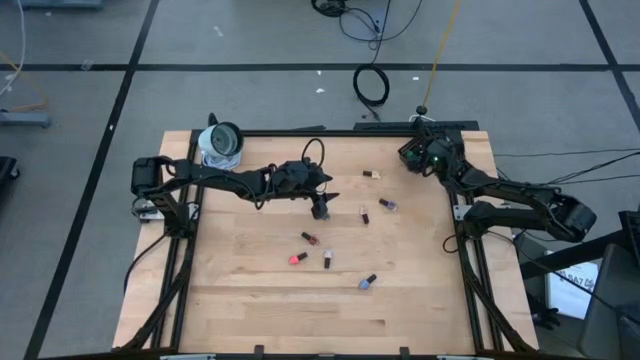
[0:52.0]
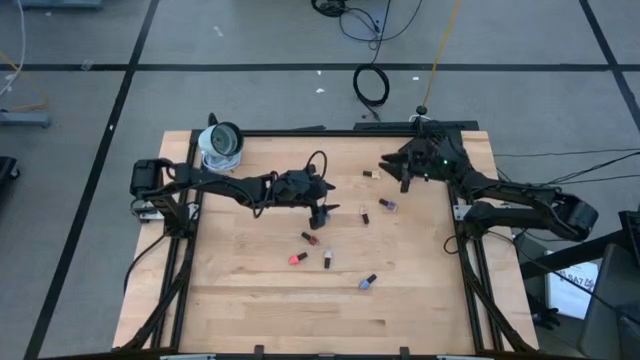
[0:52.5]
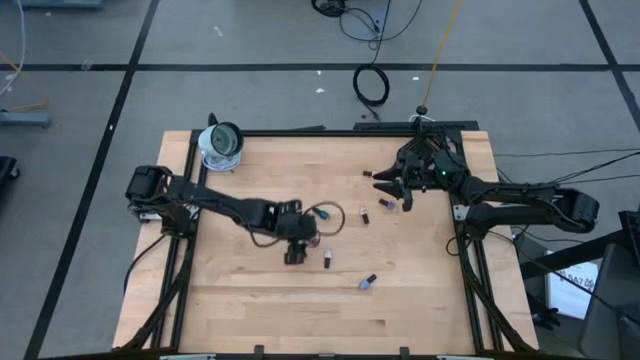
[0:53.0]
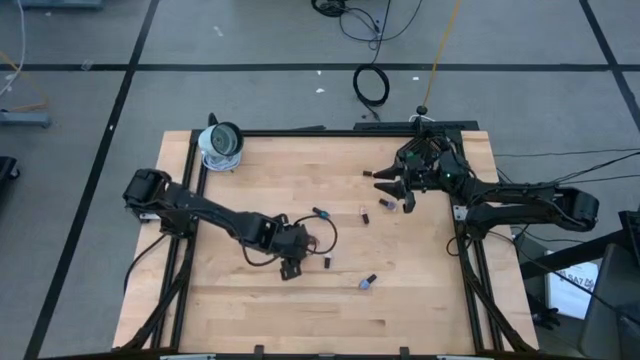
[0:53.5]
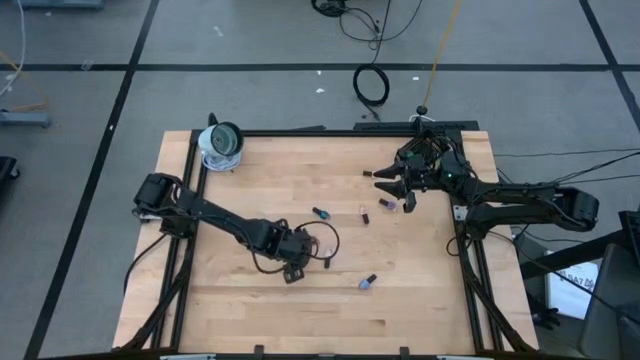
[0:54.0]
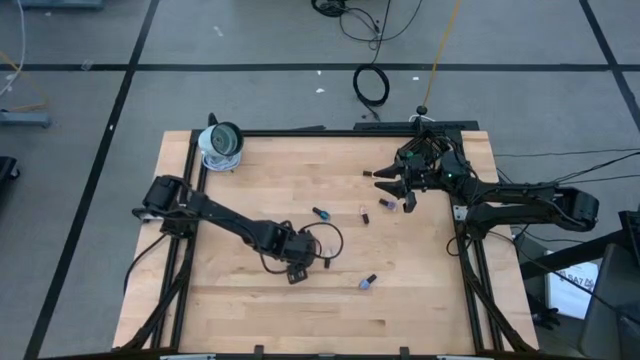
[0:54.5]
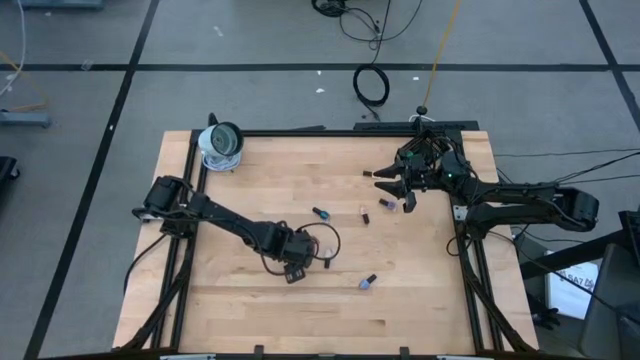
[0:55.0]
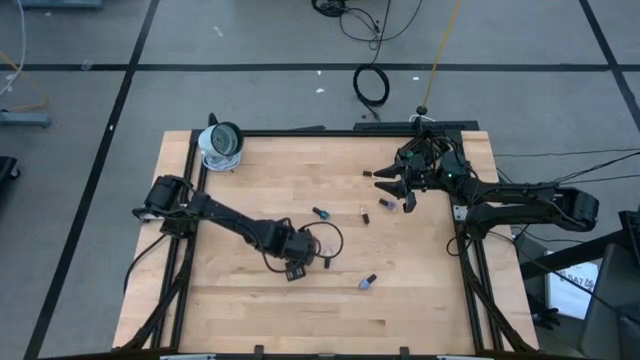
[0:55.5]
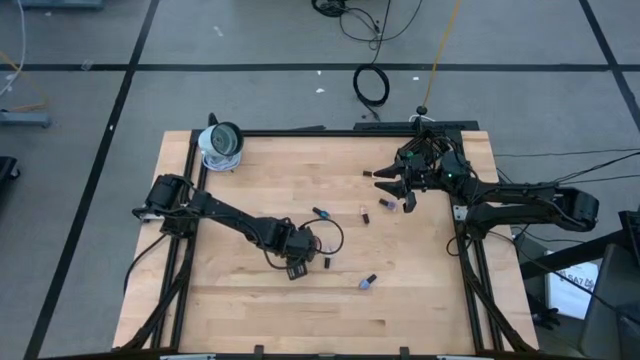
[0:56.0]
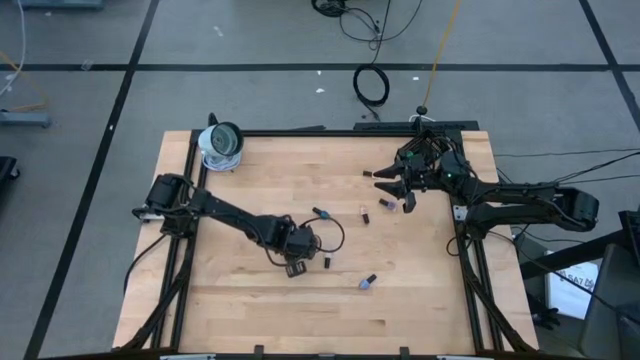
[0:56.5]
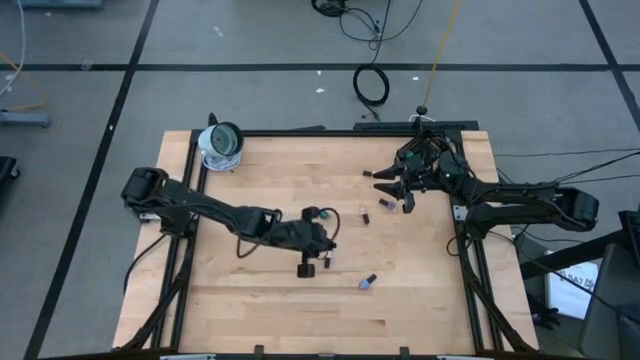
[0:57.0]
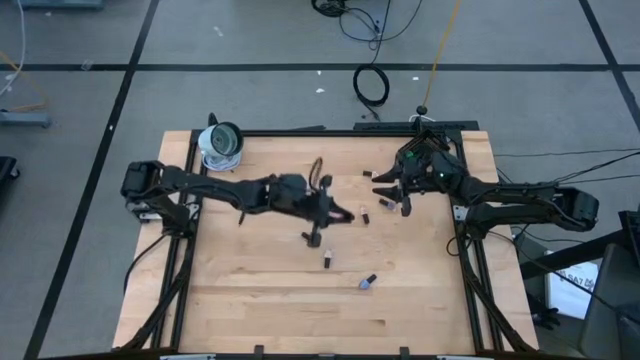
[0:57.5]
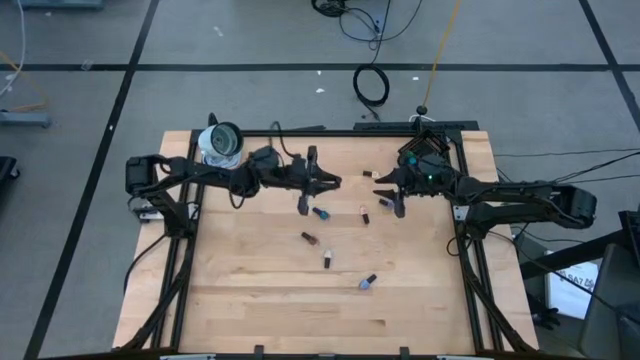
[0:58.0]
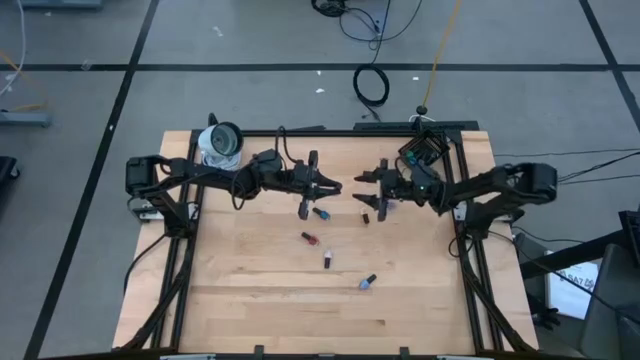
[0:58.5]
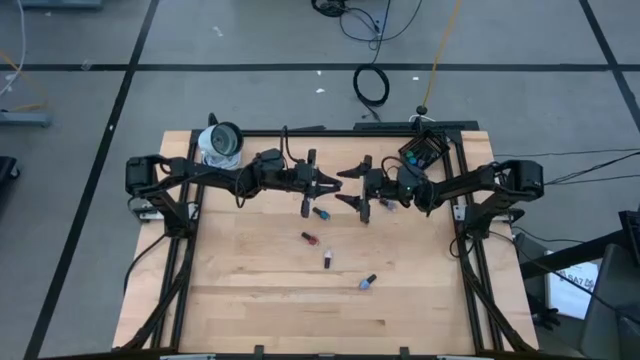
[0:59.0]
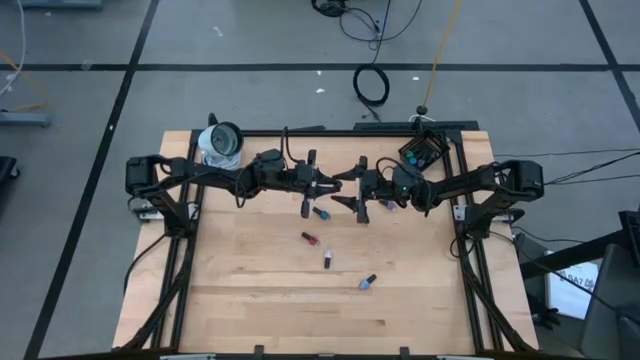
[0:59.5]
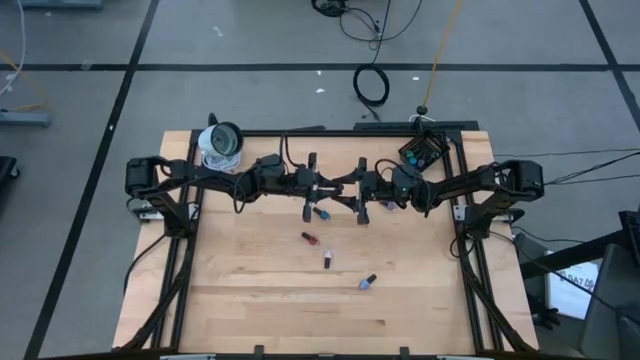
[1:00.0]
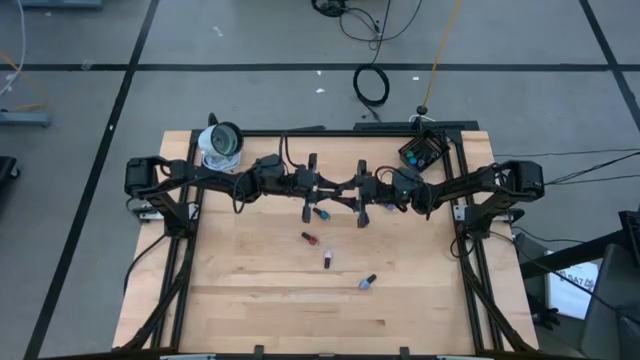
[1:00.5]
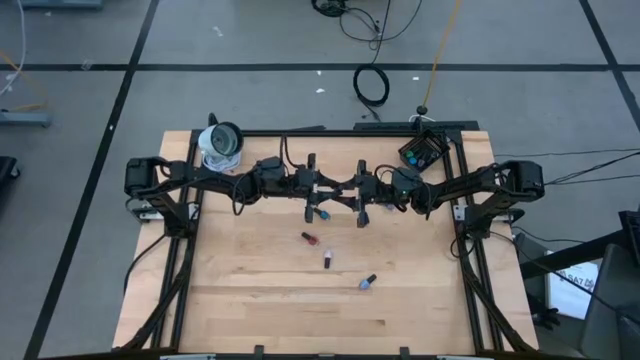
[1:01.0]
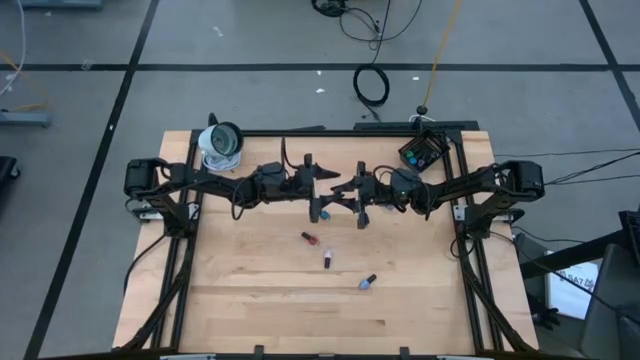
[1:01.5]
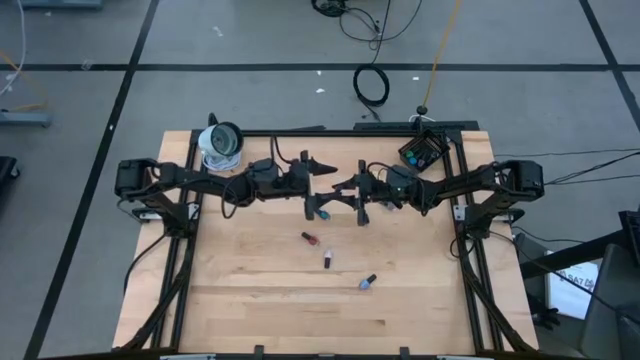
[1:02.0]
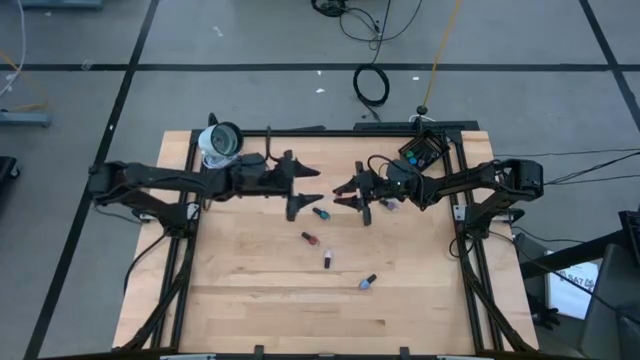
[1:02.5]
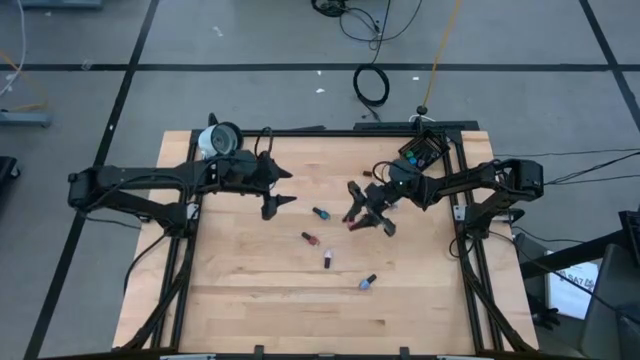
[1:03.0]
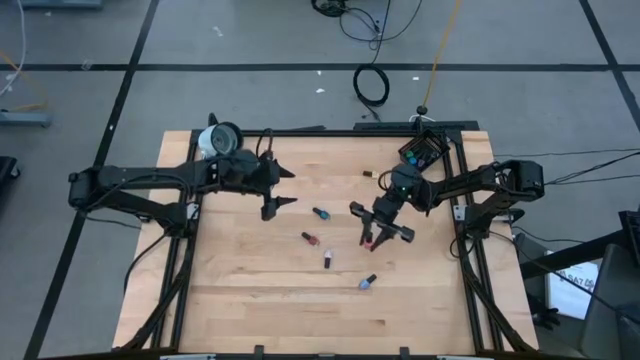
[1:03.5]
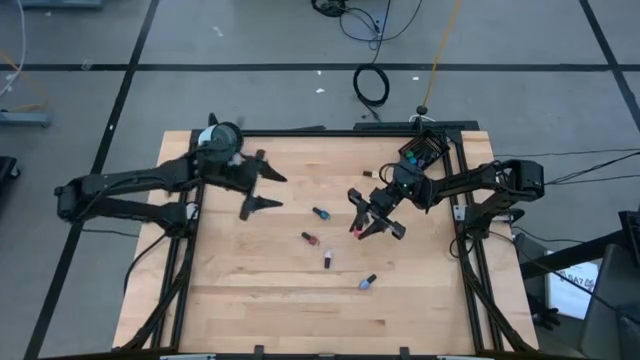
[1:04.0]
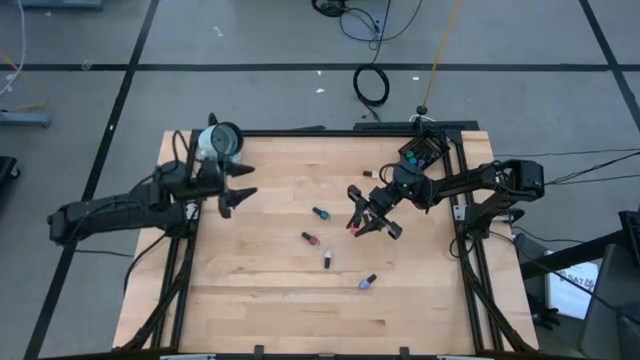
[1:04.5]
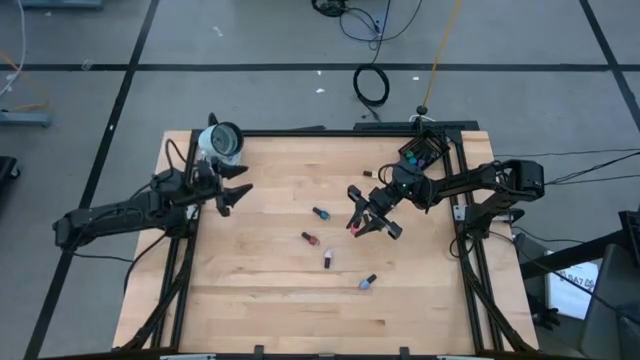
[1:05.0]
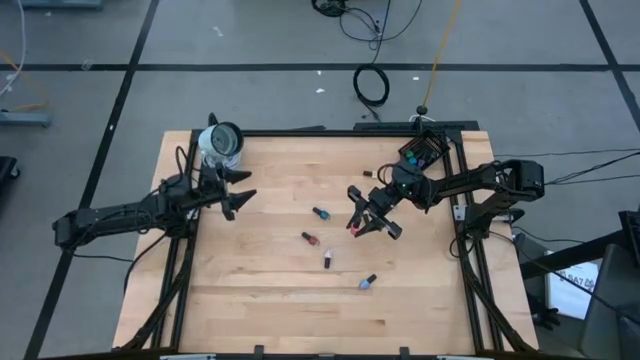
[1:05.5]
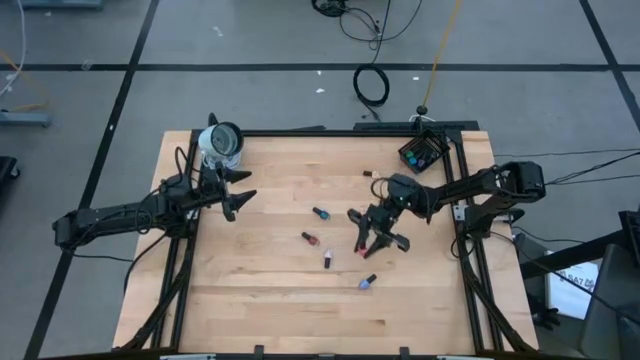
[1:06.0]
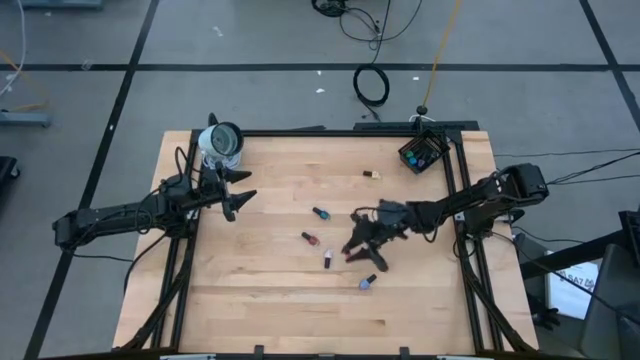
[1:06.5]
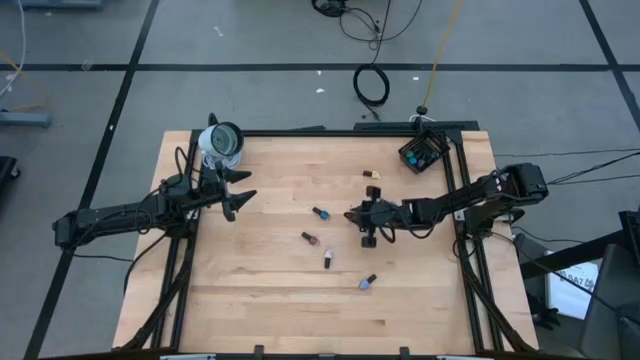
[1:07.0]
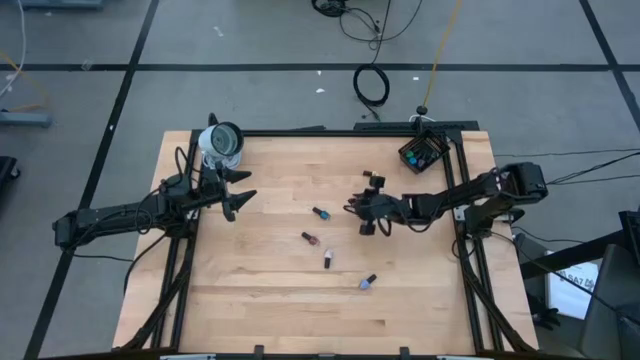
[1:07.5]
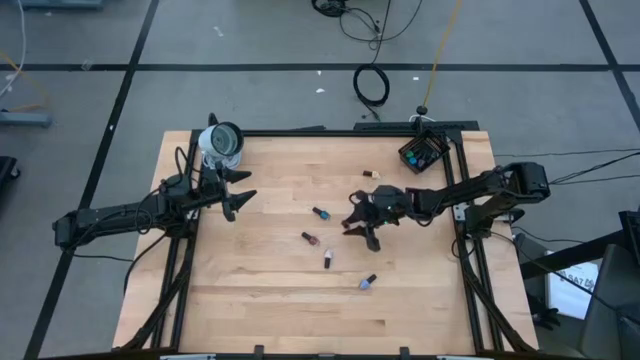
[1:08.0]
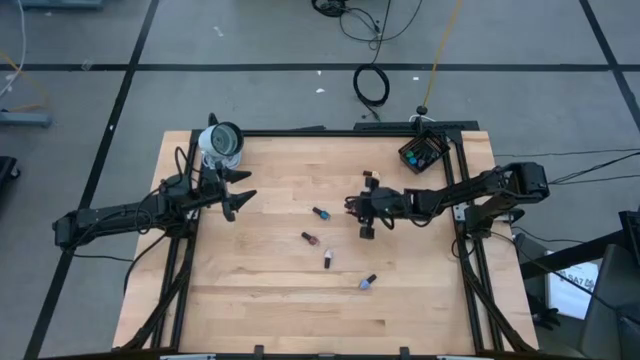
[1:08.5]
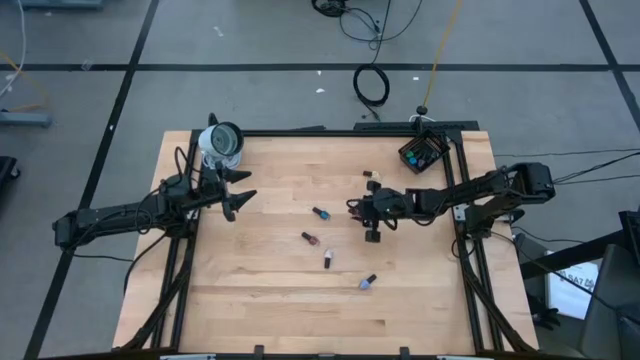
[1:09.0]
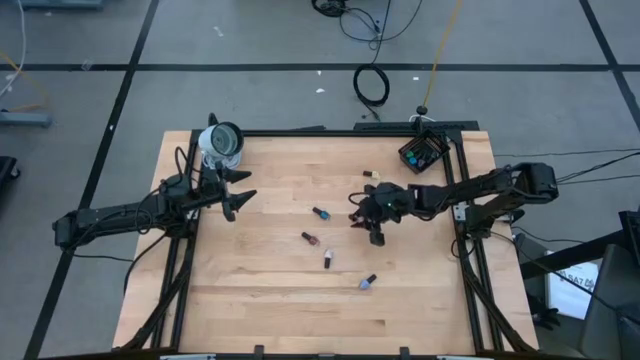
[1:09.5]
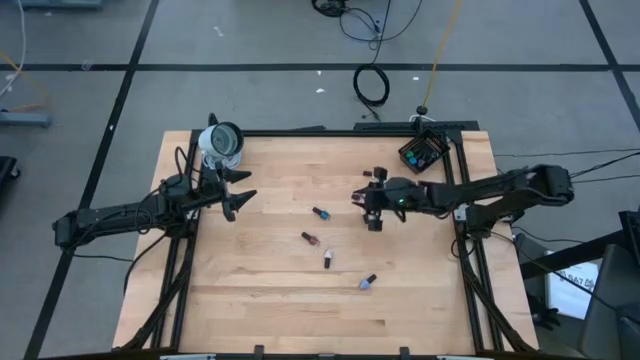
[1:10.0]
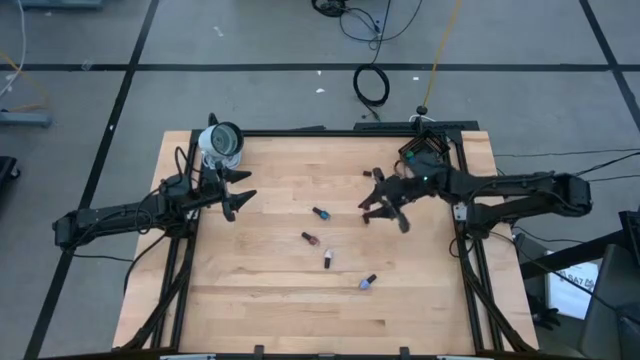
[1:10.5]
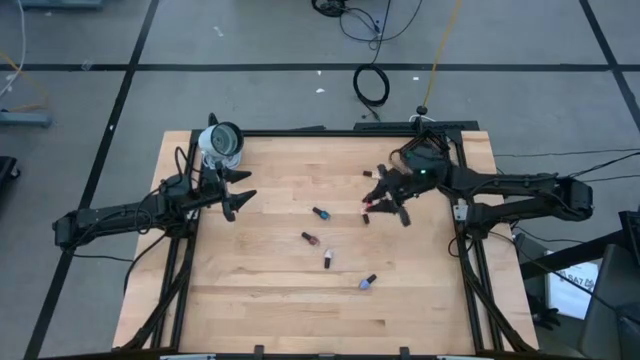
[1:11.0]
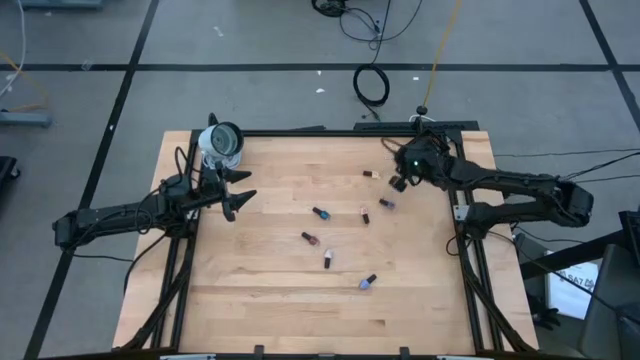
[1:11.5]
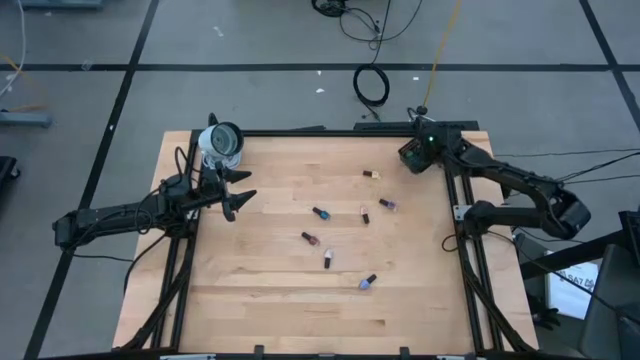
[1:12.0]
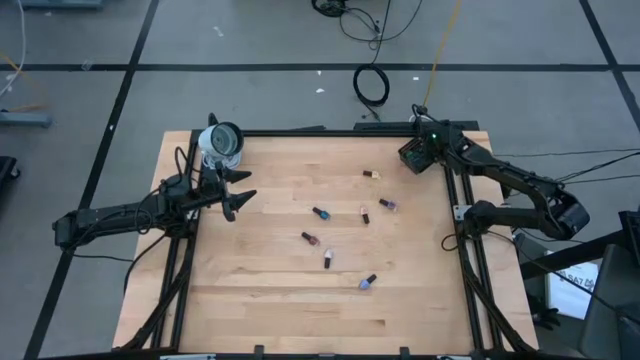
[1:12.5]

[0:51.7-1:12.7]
Task: Pick & Place Nail Polish
Put the pink nail polish into the black bin

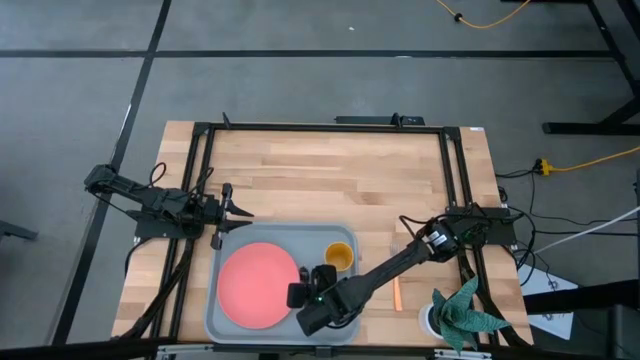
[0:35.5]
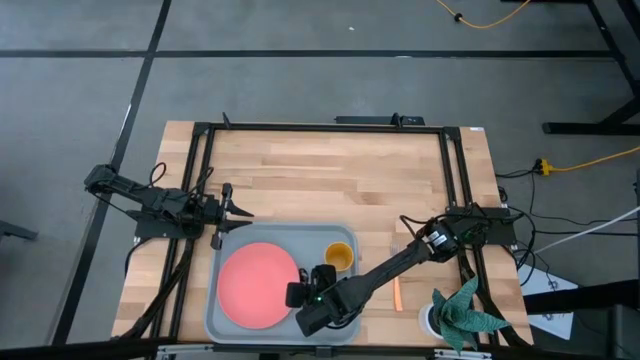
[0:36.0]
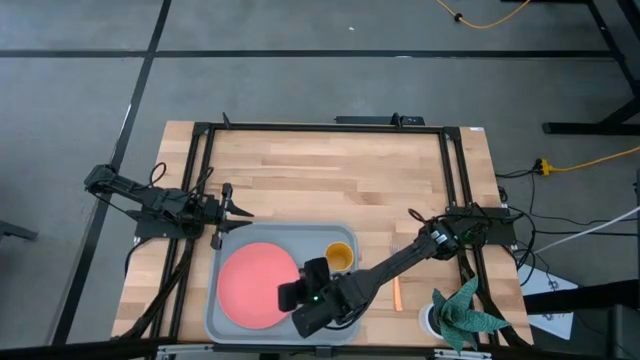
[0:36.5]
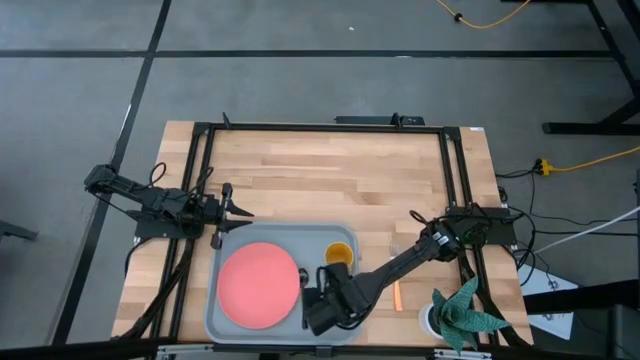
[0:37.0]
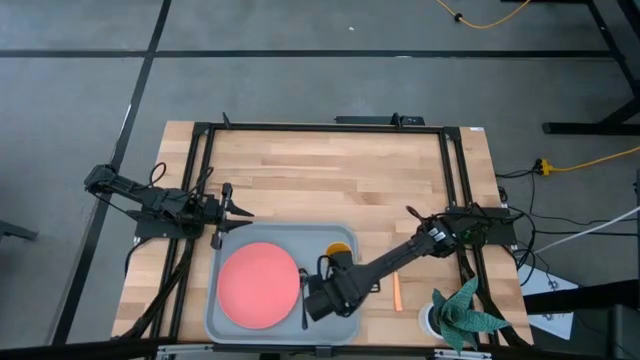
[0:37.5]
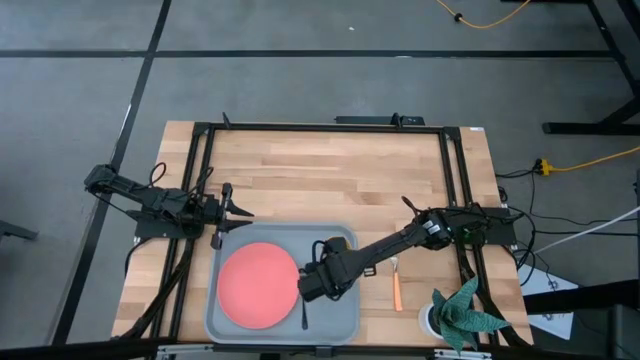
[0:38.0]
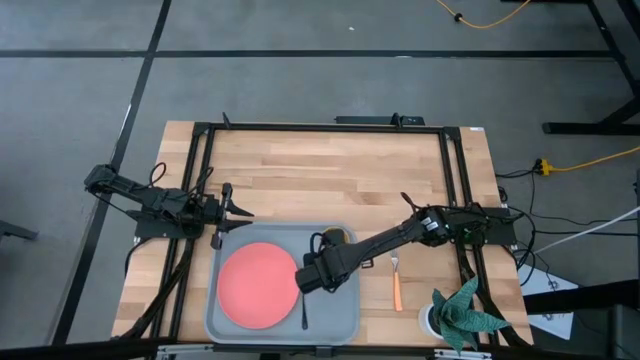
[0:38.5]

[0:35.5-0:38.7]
Task: Pick and place plate/cup/fork/spoon on tray
Adjust the yellow cup on the gray tray
